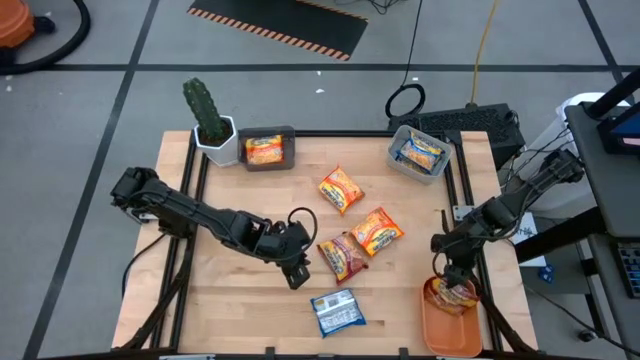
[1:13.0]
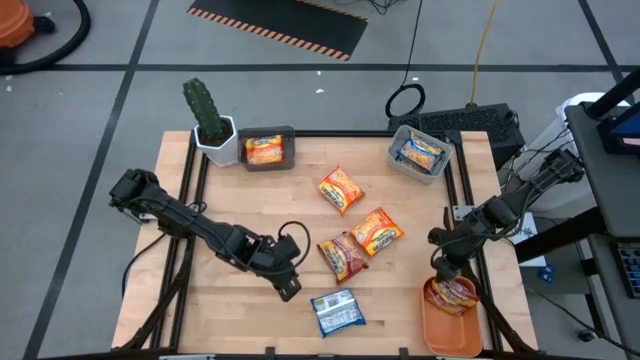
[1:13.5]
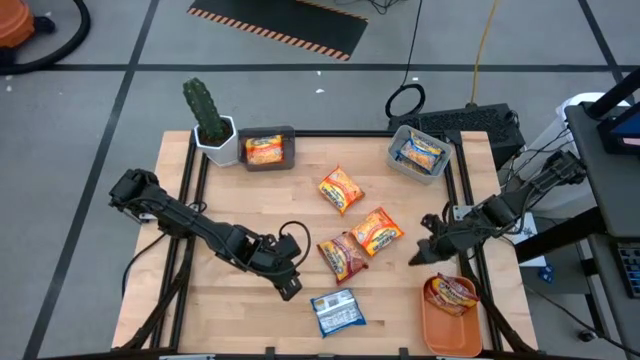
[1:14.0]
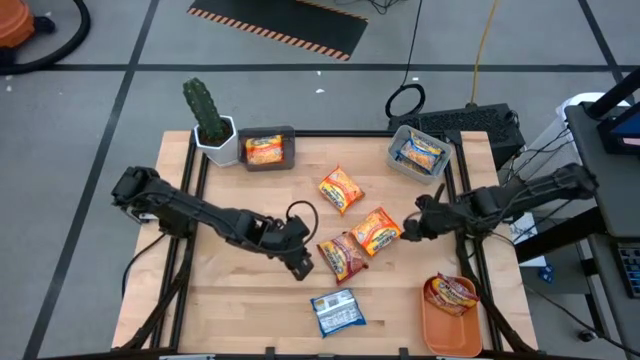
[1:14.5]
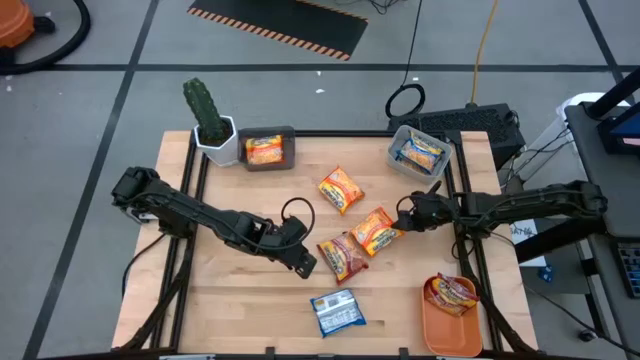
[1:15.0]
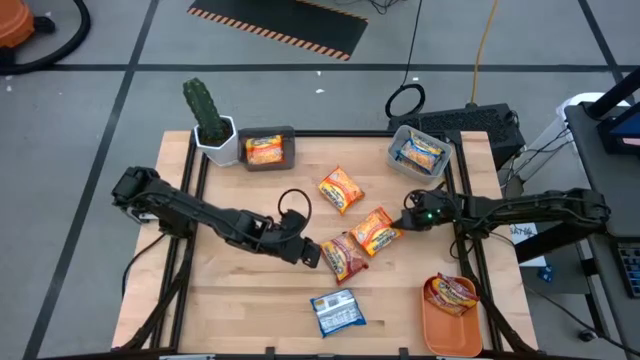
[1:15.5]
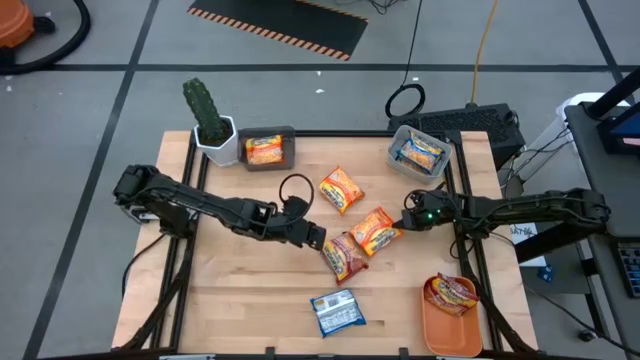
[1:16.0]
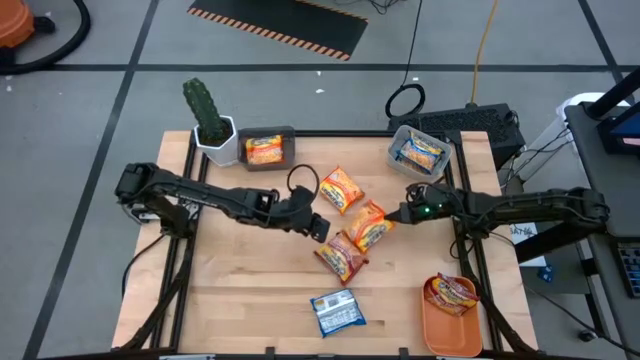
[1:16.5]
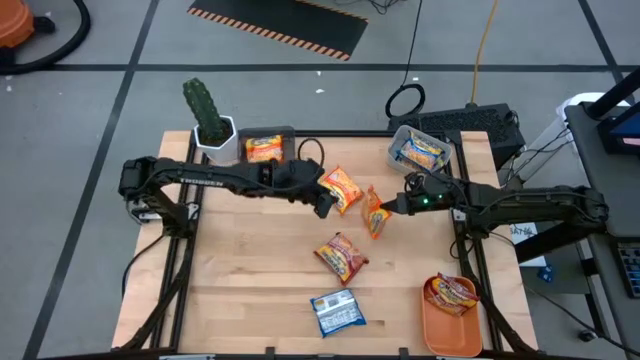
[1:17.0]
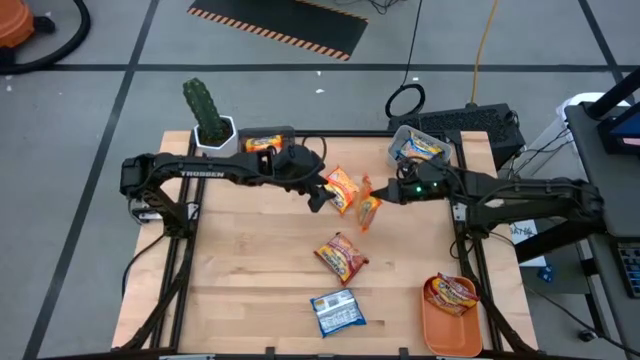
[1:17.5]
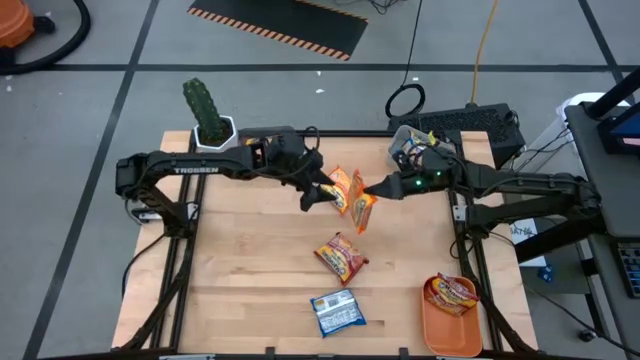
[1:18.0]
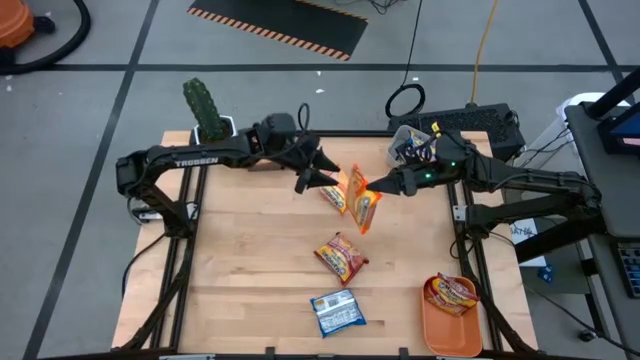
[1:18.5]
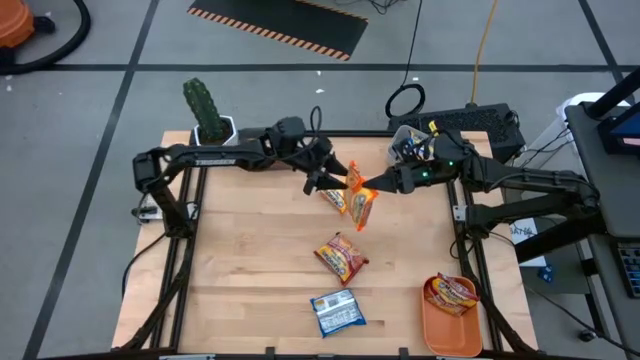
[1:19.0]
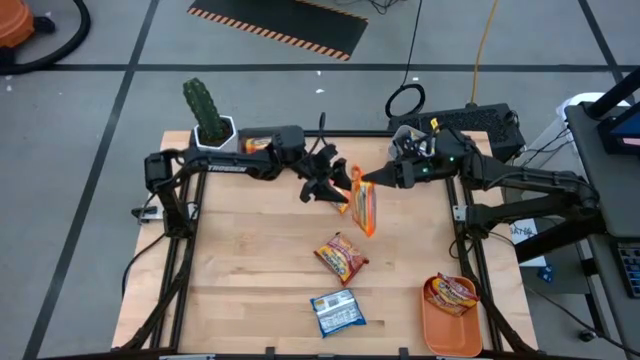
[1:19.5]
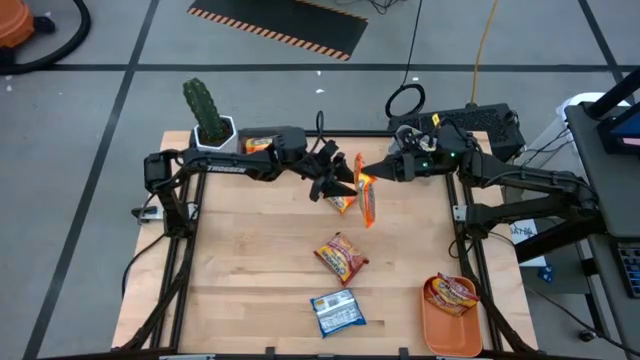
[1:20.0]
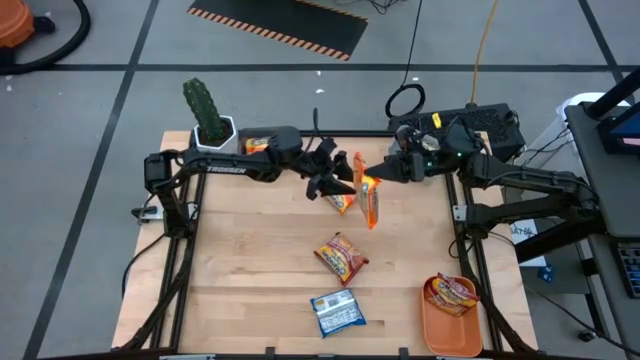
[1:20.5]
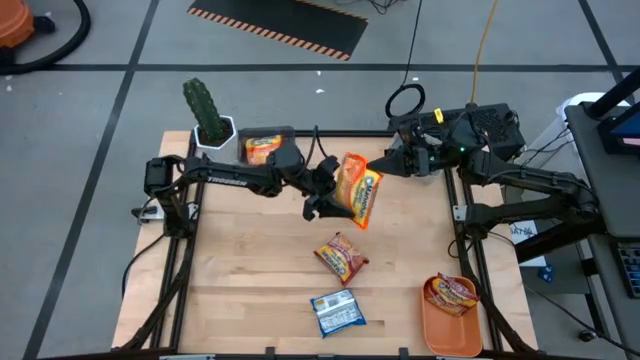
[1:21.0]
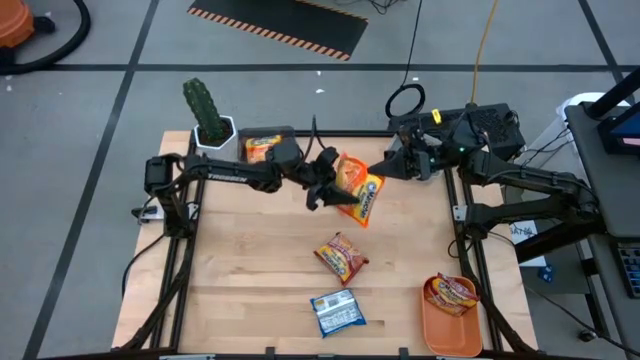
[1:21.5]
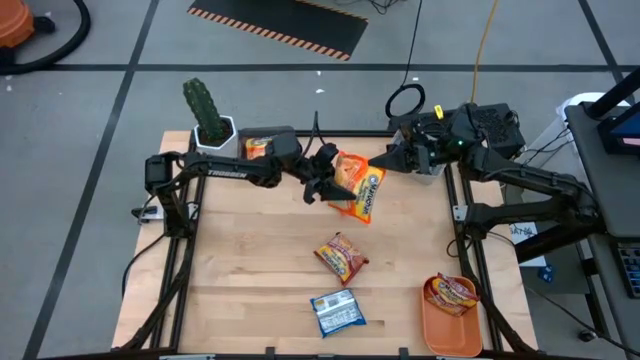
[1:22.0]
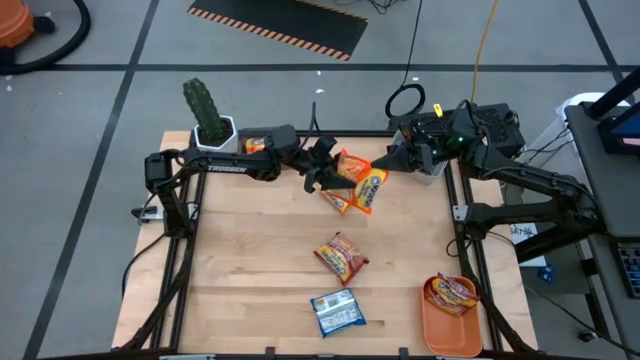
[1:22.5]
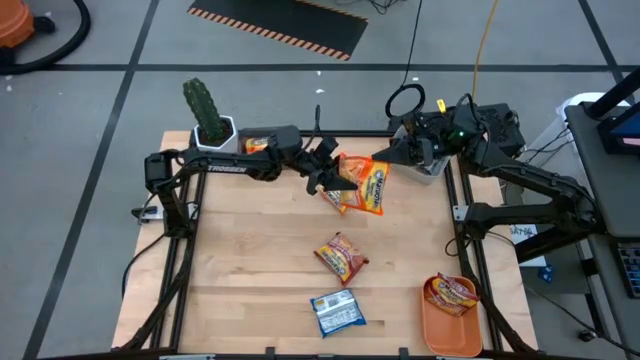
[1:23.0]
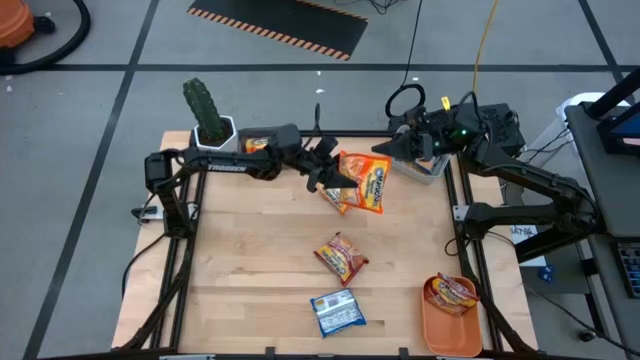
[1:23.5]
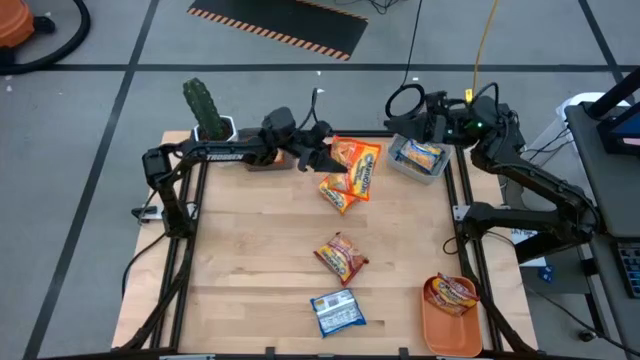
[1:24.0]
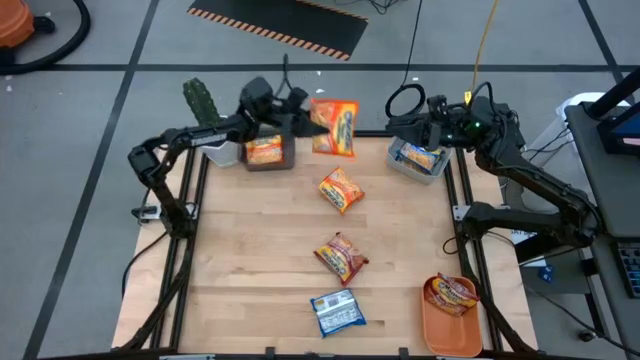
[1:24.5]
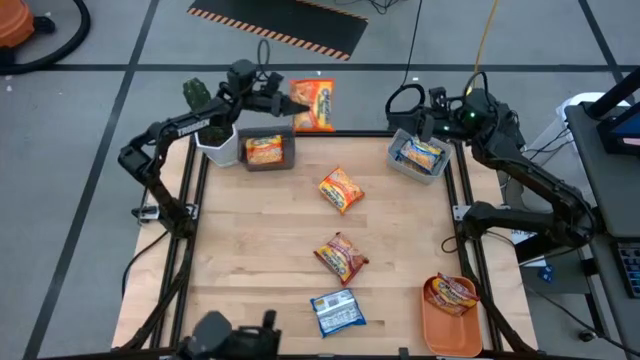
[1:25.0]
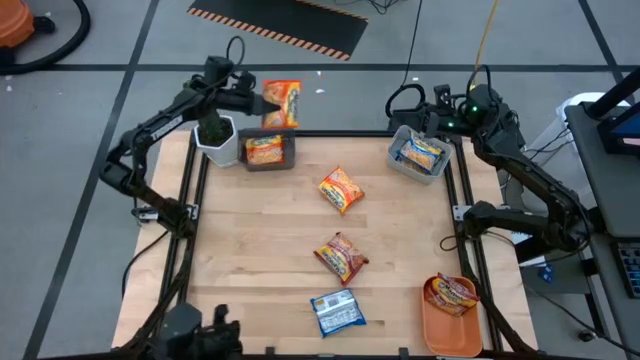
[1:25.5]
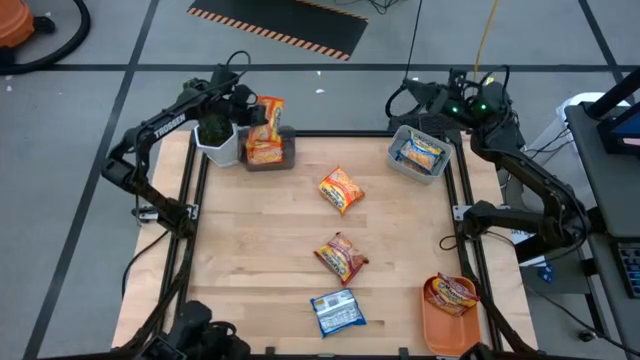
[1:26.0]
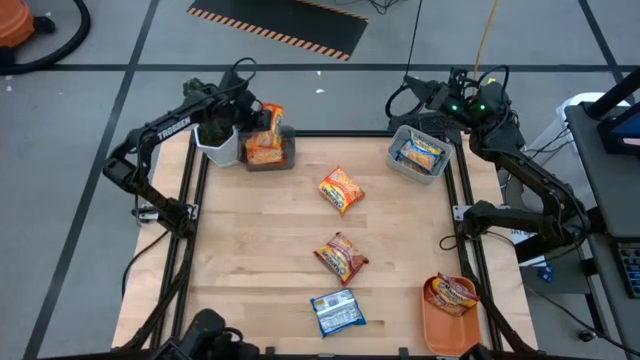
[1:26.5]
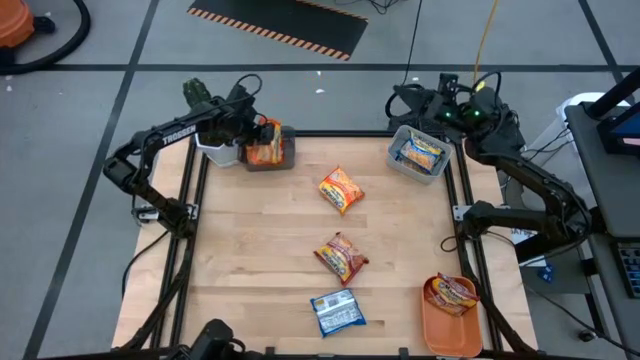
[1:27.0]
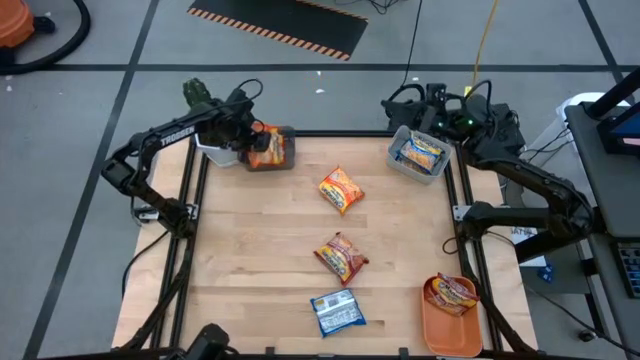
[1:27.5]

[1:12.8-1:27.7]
Task: Sort Maruchan noodles
Put the bottom orange noodle pack into the black bin

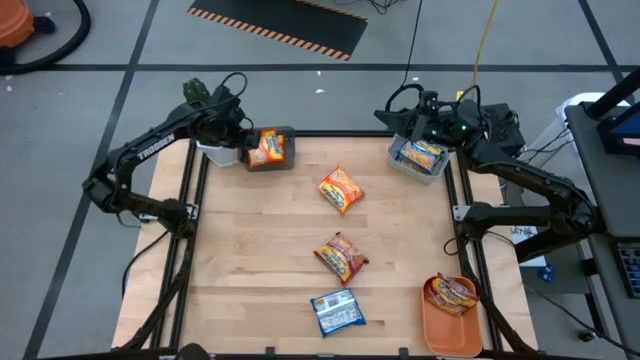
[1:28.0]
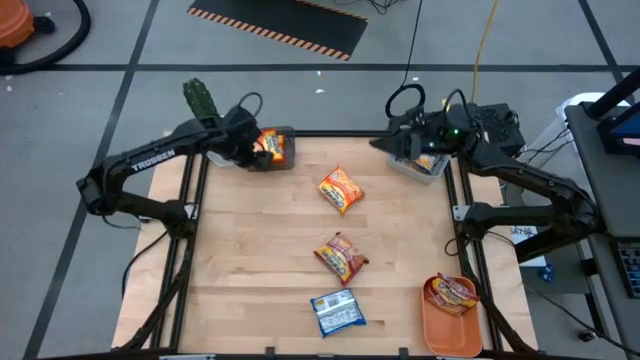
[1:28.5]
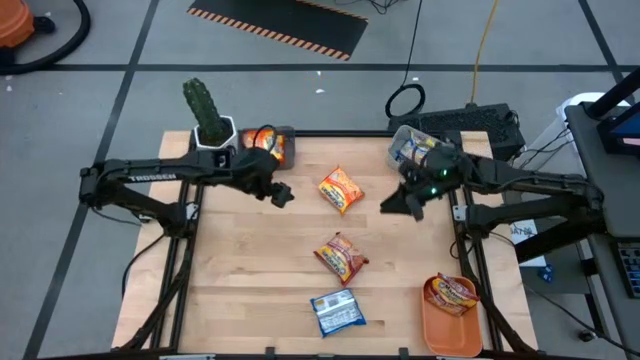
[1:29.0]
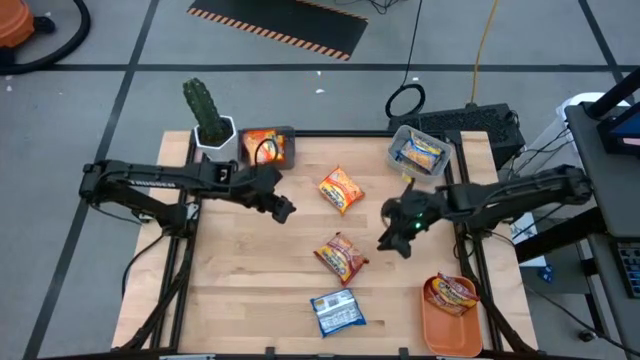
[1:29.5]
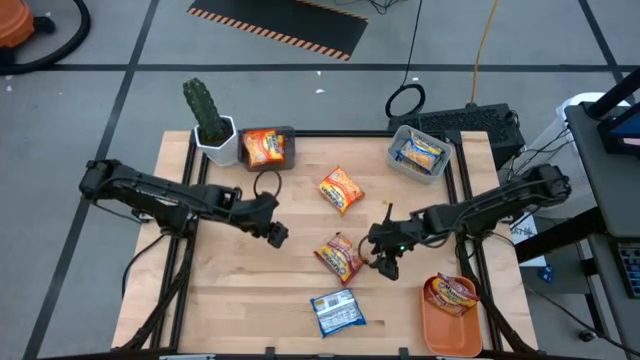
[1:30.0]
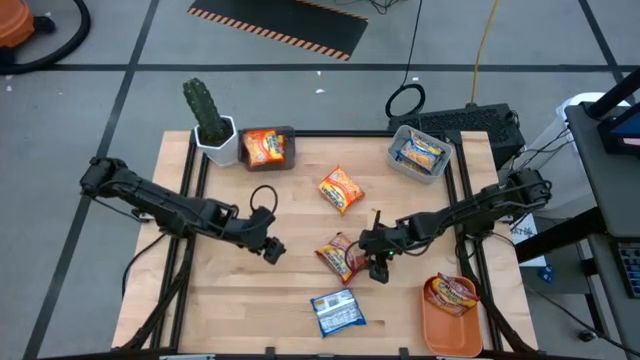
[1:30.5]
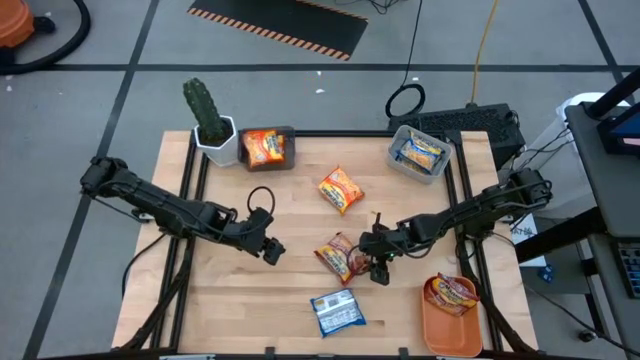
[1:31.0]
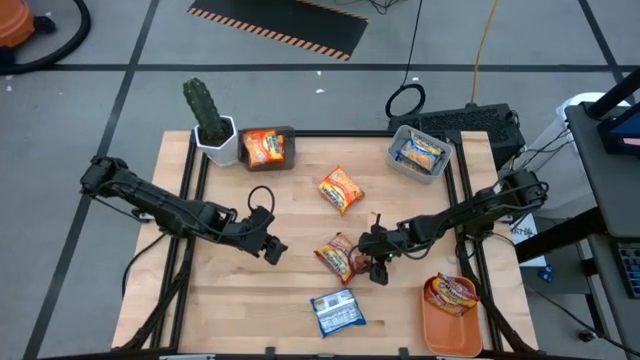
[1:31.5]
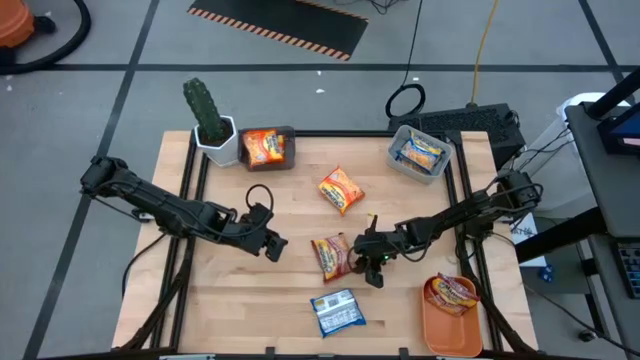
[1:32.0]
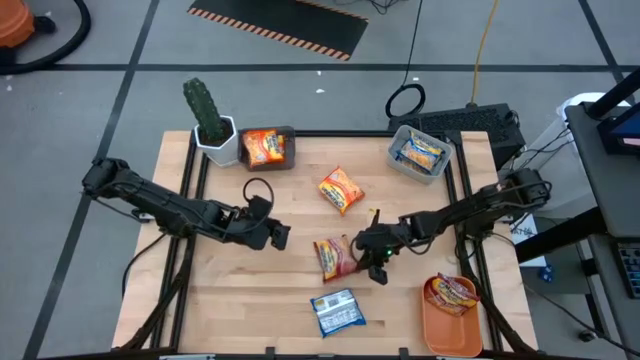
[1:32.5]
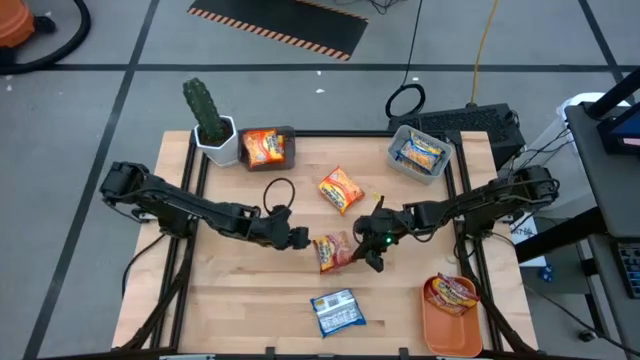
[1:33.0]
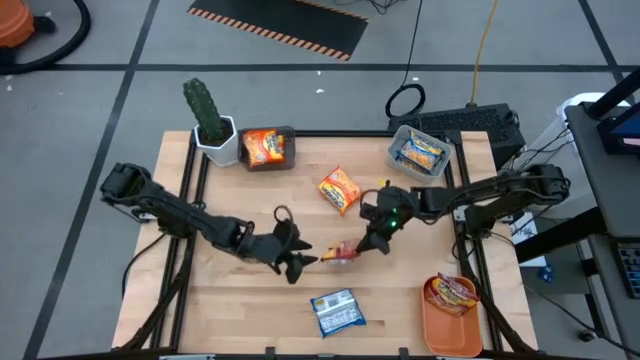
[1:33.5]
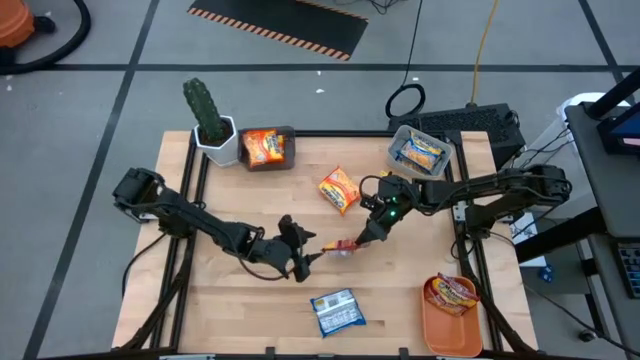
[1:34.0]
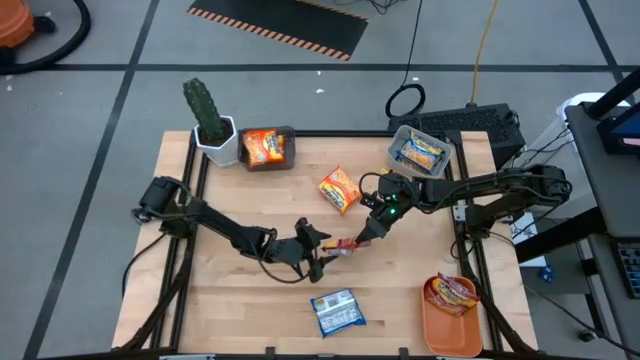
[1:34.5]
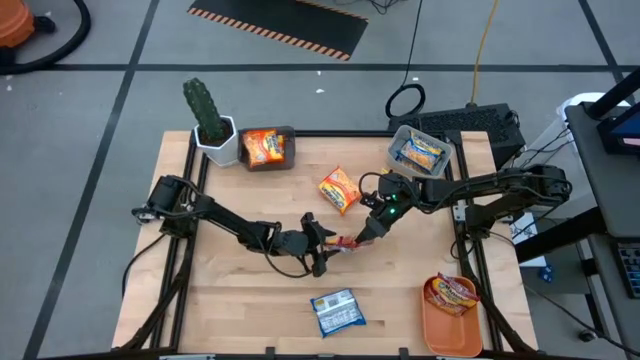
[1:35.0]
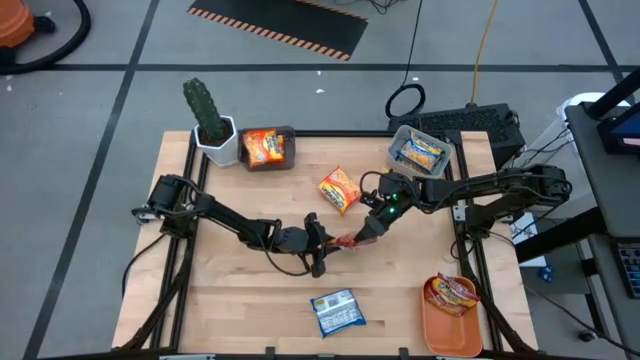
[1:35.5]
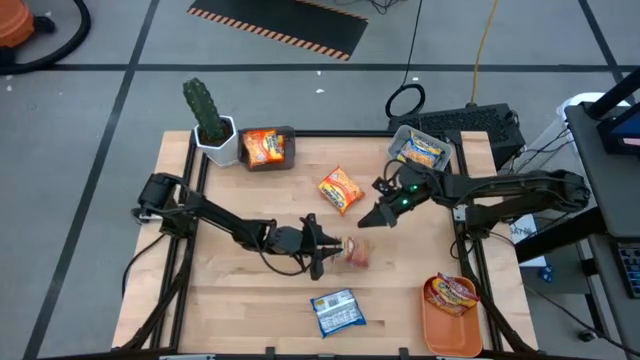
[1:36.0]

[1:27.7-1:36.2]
Put the red noodle pack into the orange bin
